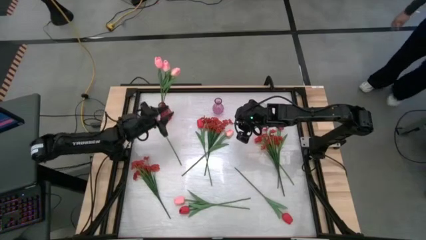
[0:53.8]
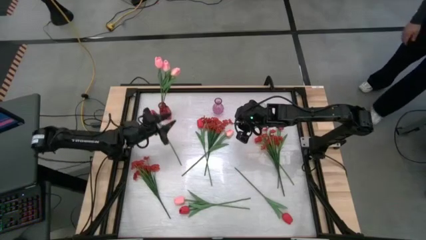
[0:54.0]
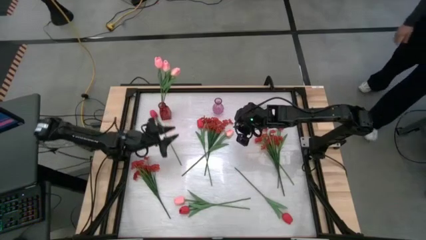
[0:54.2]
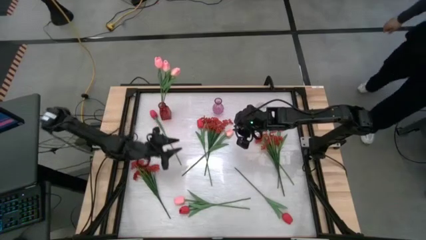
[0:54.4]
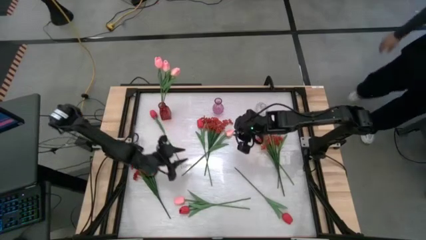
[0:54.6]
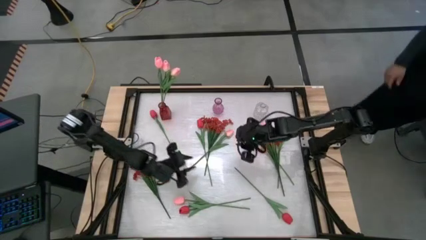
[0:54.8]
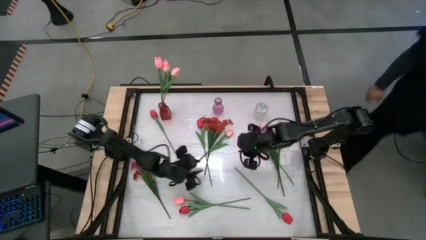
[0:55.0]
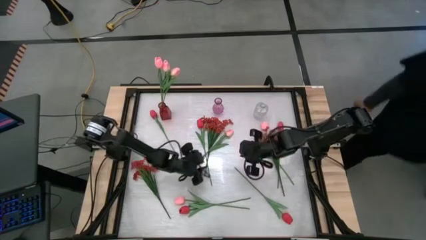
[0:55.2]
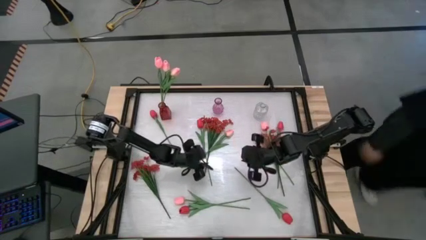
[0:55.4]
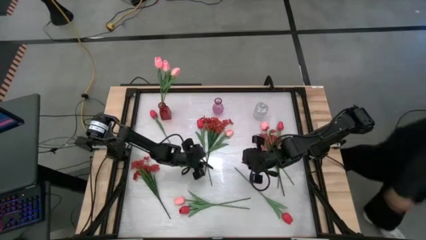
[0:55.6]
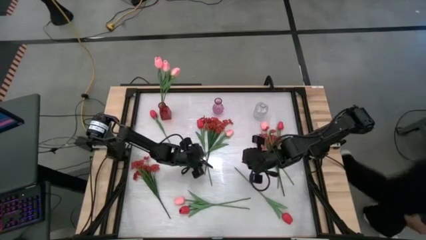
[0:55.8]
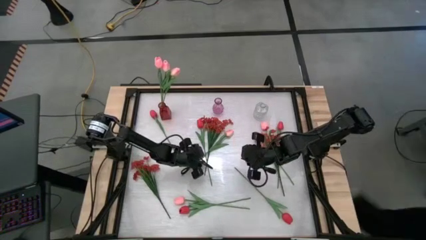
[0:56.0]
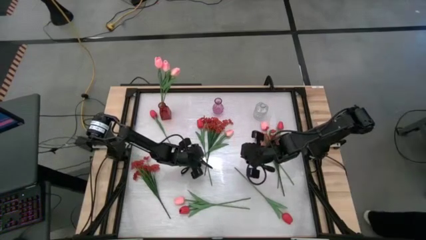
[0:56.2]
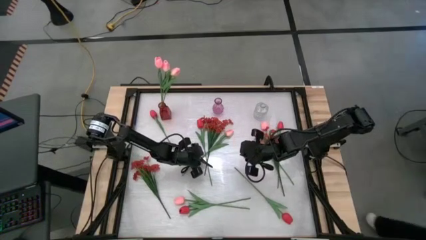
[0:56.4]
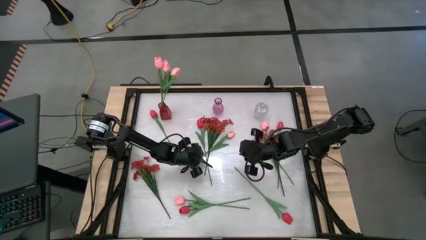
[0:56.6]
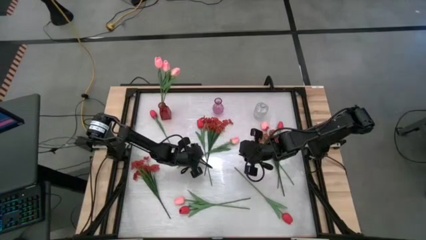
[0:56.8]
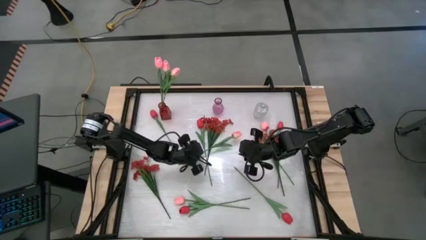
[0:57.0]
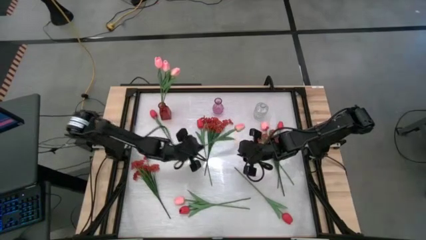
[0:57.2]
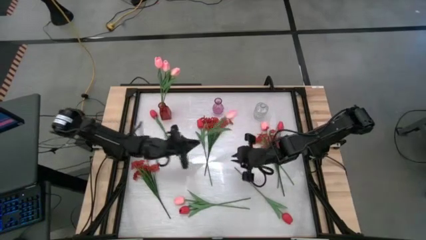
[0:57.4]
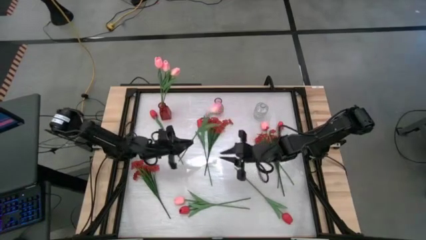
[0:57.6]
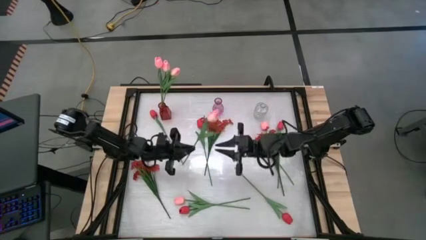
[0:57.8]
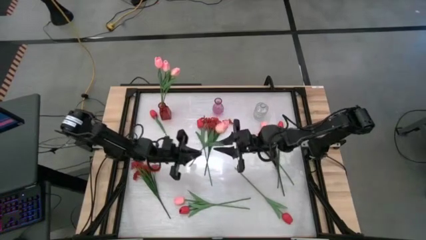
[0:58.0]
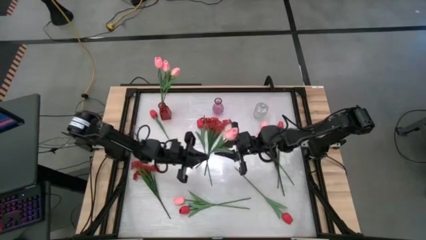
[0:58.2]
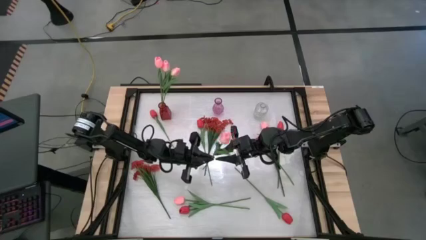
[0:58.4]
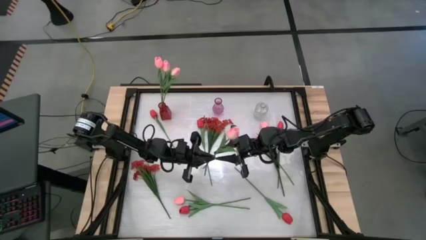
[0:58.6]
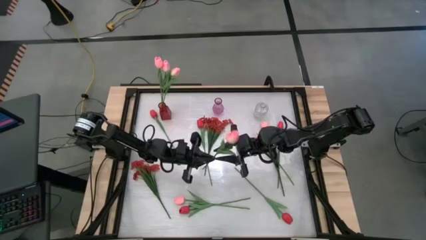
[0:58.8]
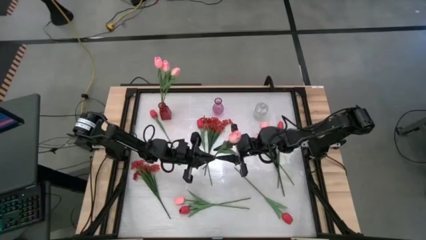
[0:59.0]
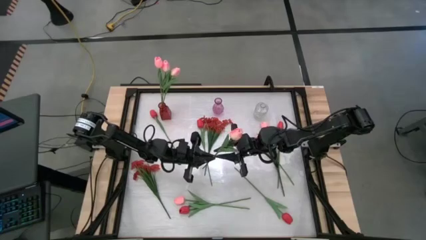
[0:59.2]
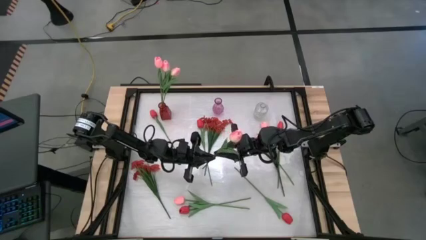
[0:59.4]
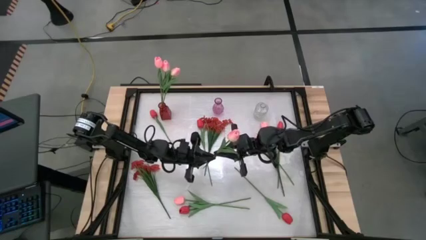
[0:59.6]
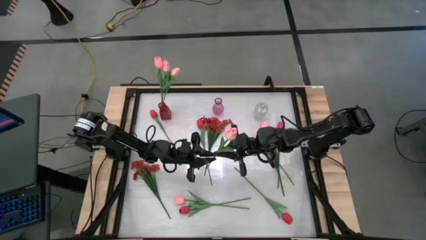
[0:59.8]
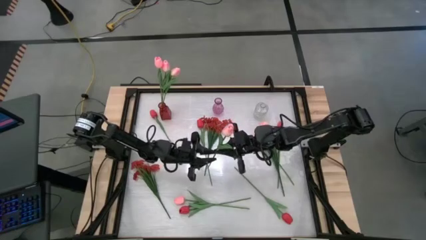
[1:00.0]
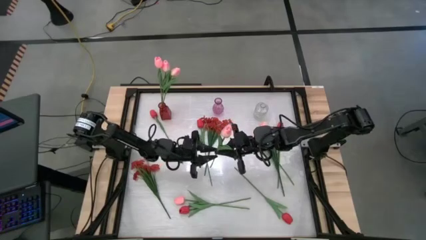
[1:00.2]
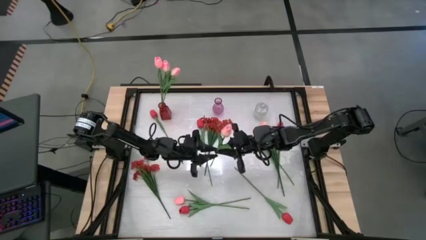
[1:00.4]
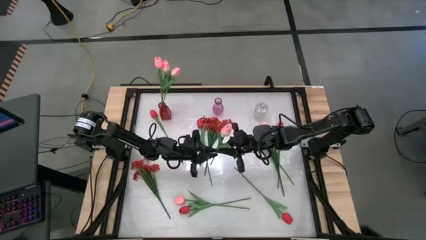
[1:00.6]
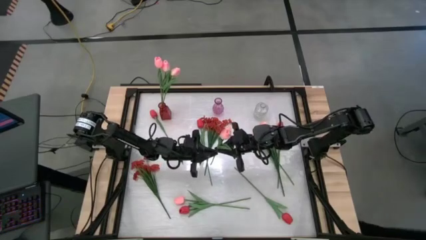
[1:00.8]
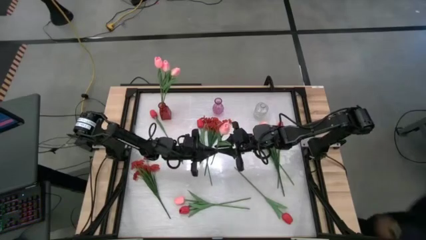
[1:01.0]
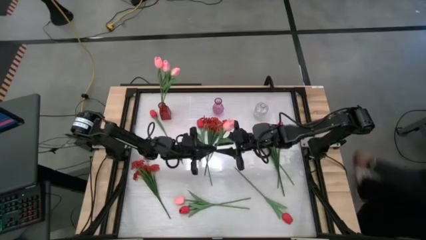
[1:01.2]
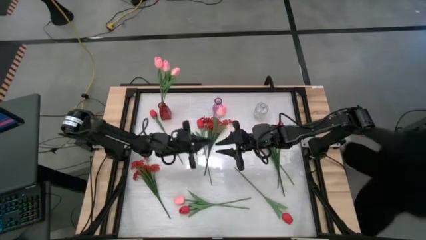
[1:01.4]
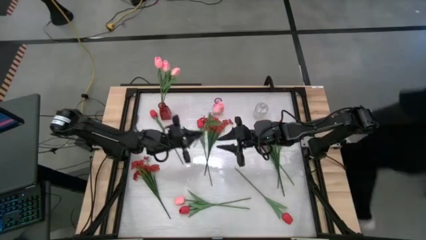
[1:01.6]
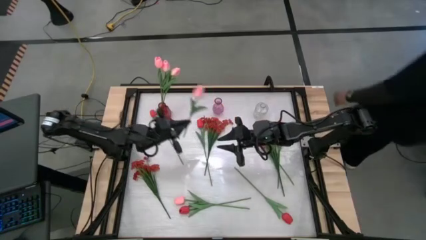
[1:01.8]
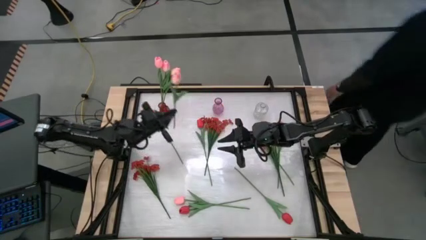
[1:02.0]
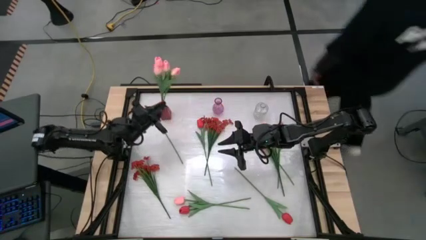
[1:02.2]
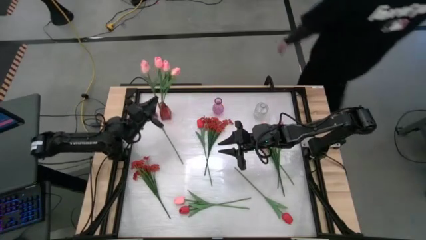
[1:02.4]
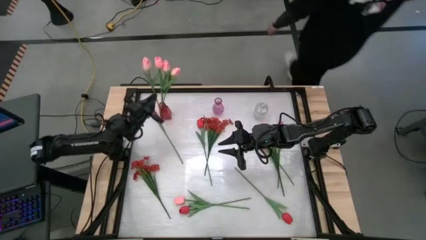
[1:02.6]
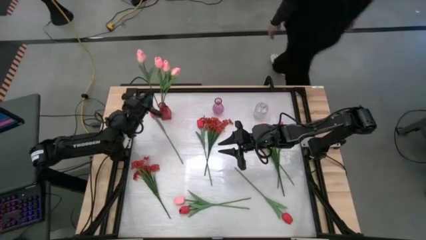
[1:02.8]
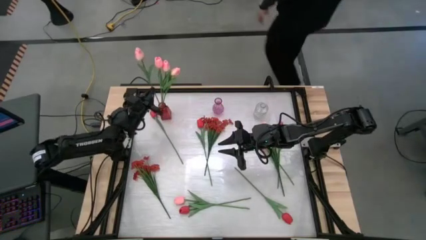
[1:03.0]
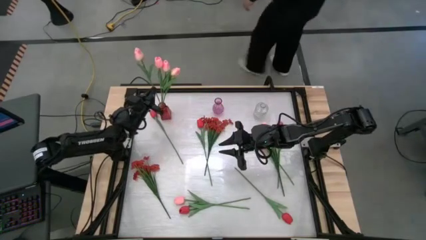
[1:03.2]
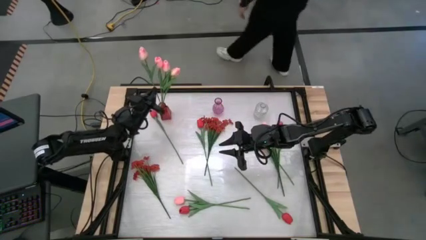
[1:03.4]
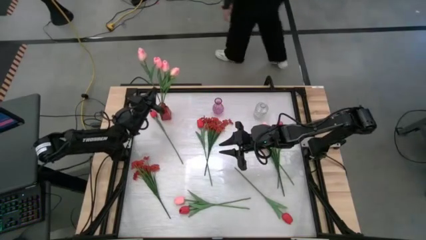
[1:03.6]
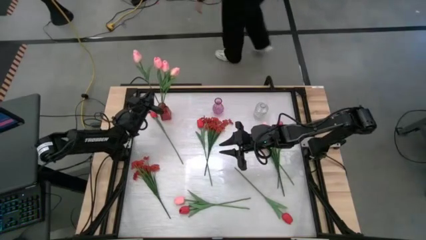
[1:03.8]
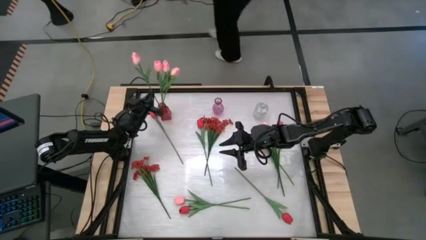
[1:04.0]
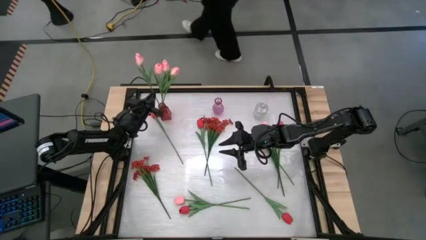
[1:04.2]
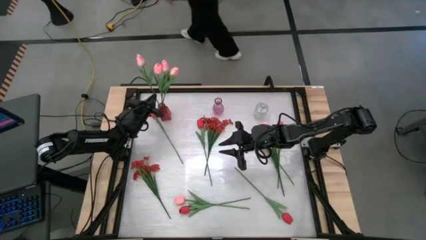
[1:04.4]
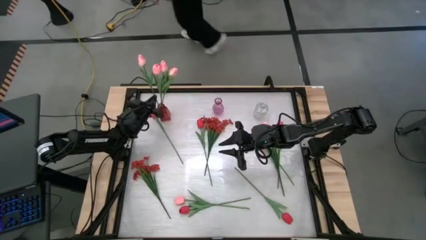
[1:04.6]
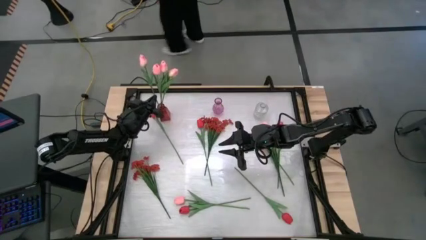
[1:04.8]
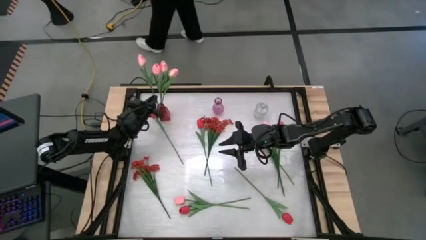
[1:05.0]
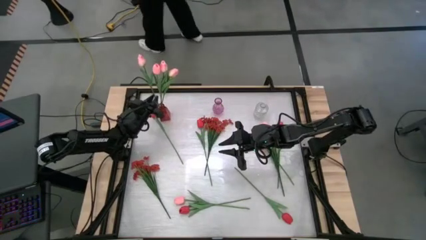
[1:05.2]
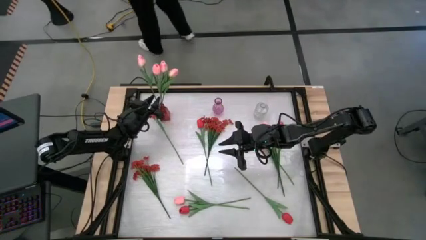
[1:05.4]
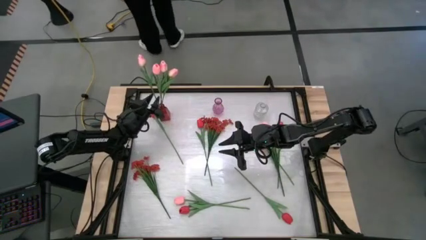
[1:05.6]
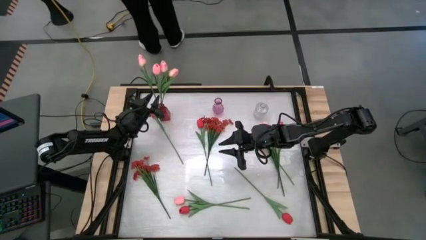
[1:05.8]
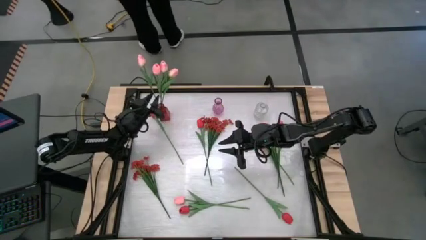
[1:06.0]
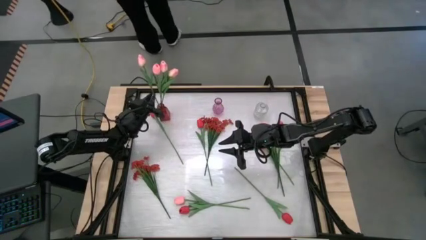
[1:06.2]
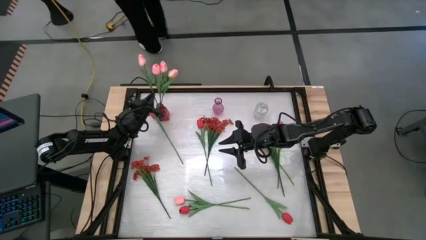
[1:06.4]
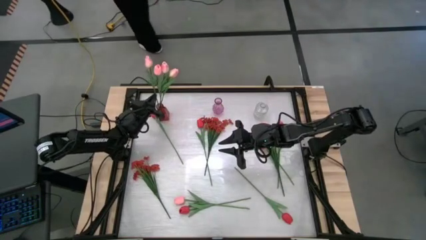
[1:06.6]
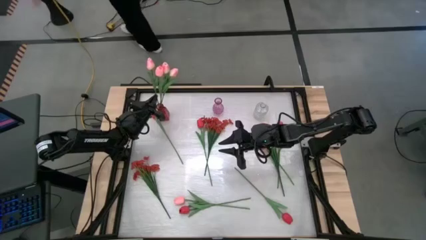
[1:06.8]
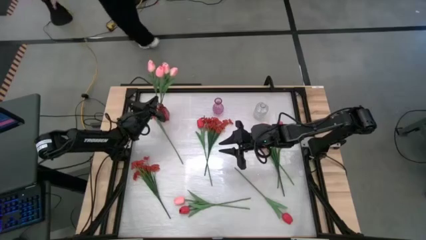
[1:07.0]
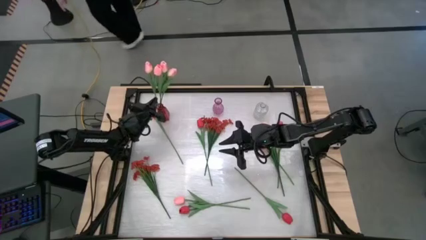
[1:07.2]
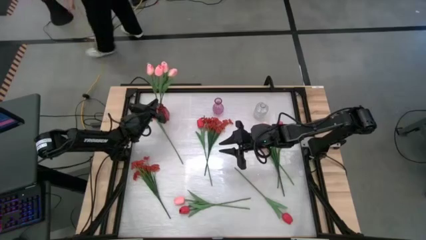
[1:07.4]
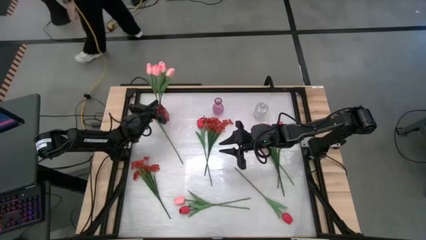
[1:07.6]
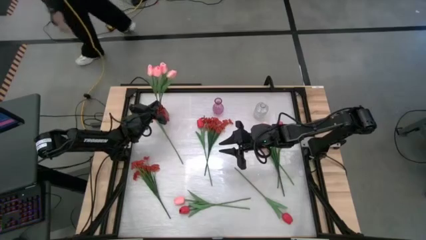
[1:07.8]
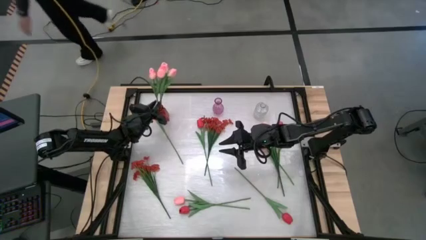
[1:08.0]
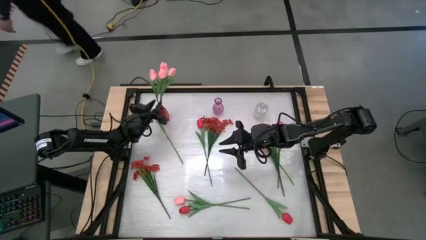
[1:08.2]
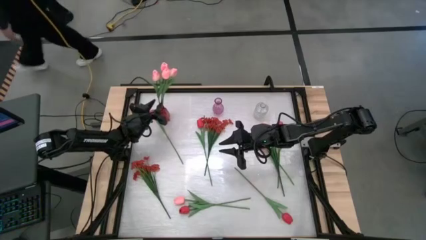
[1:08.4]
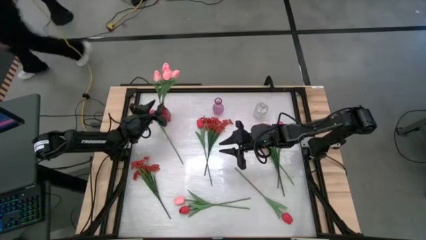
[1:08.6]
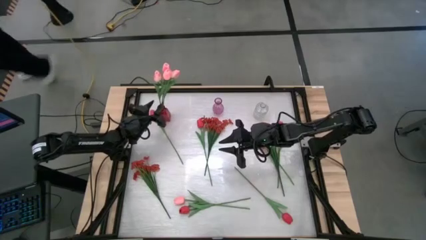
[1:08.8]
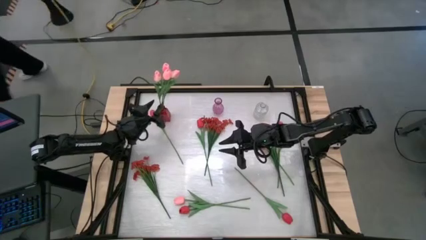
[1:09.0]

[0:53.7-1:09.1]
Task: Sort flowers into vase by color
Put the pink tulip into the red vase

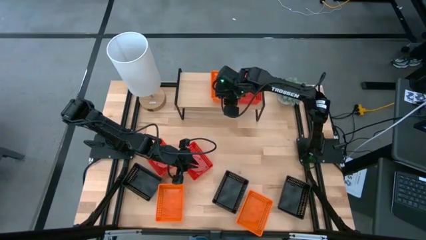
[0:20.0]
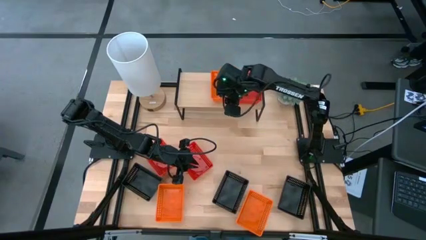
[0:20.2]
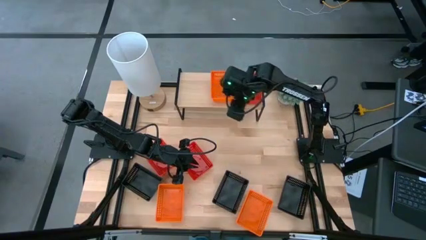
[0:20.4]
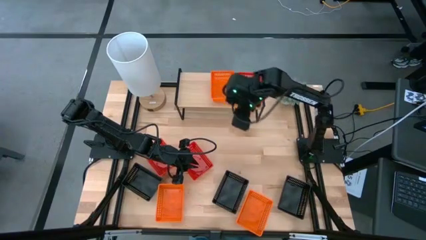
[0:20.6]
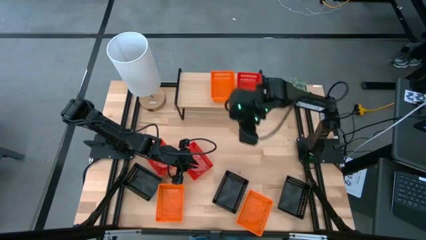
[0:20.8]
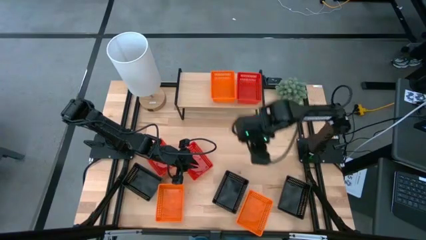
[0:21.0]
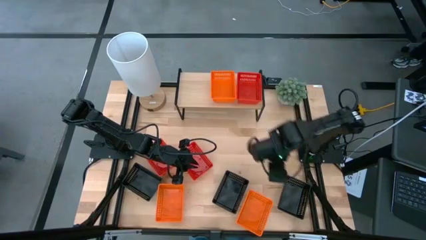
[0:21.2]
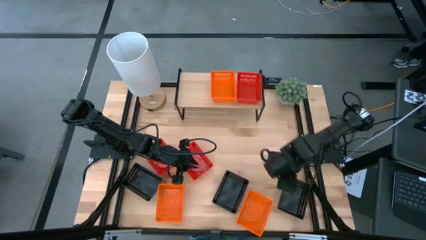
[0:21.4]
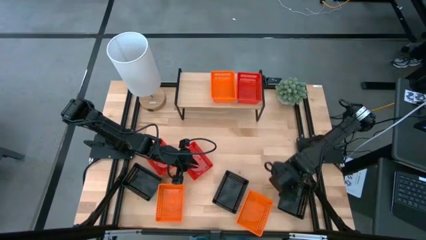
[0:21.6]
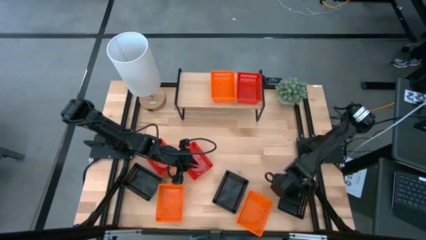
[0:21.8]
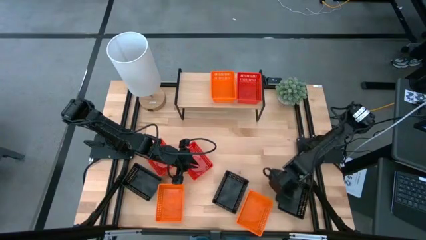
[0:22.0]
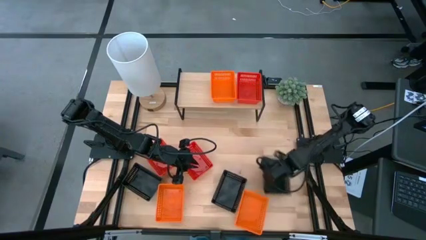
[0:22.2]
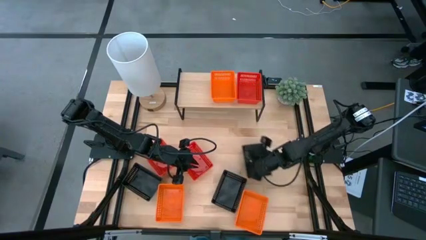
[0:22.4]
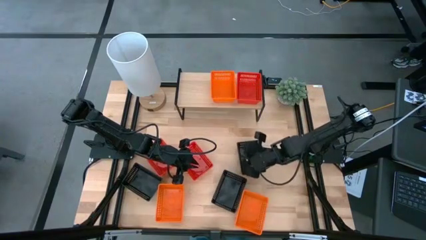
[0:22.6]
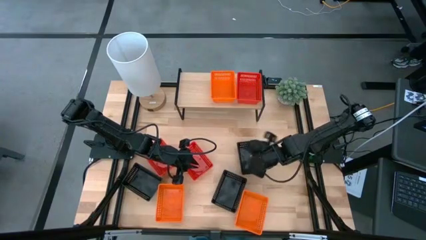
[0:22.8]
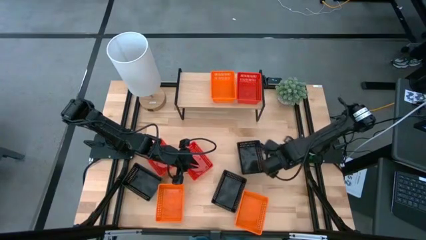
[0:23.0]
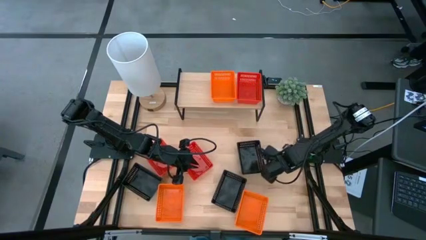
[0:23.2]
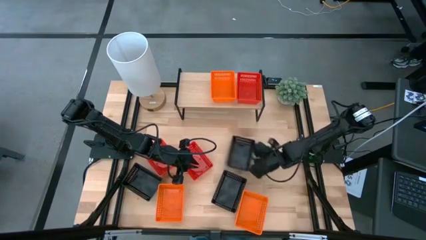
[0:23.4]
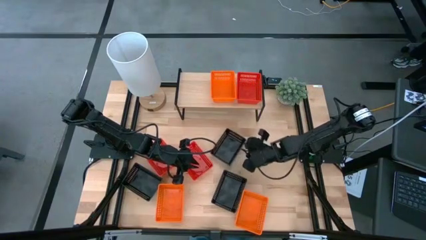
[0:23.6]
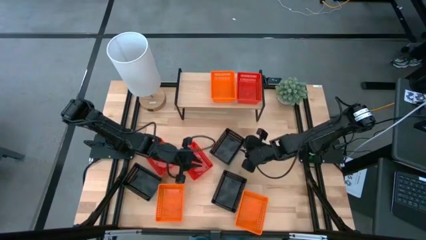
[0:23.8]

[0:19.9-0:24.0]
Task: Stack baskets on shelf by color
Move the black basket to the center of the table
